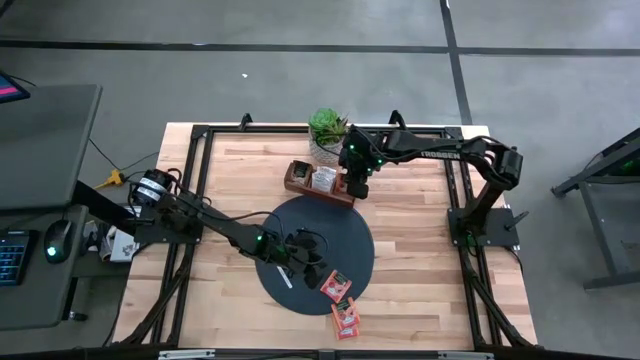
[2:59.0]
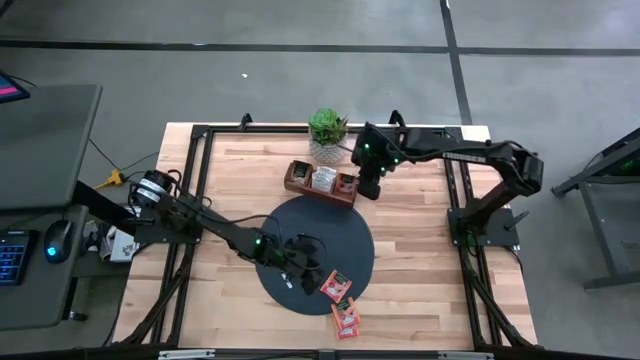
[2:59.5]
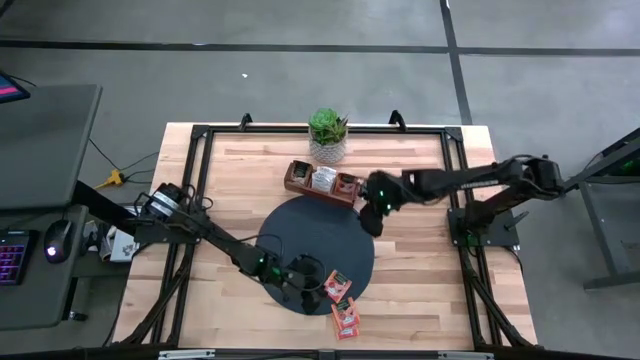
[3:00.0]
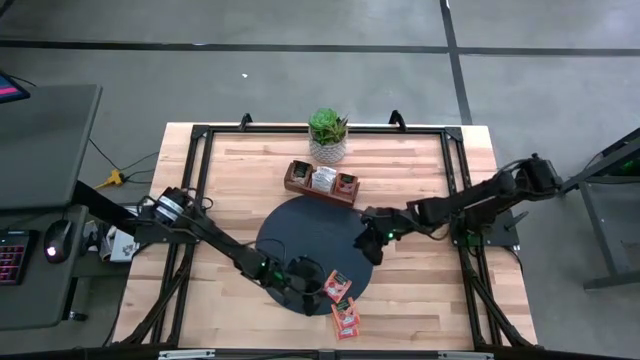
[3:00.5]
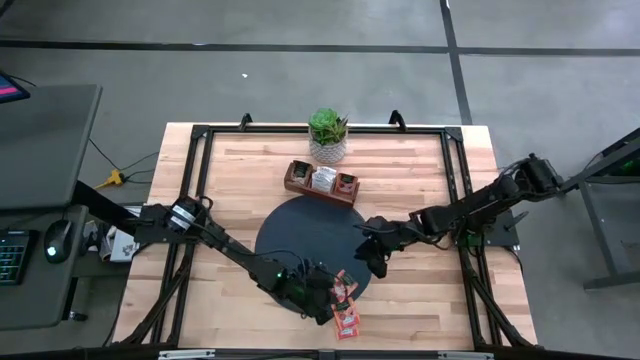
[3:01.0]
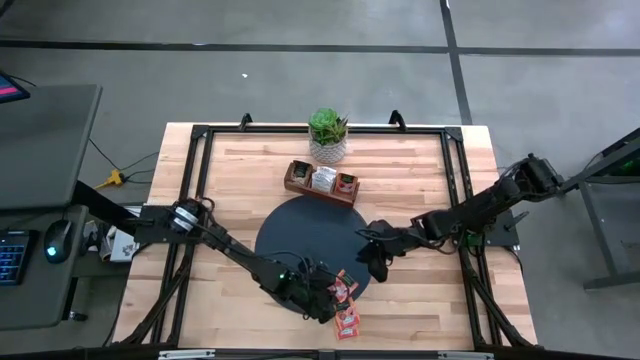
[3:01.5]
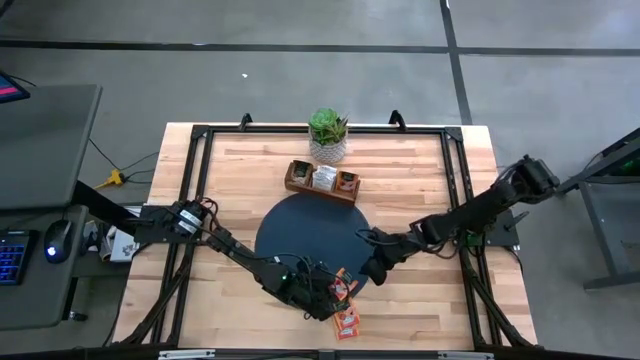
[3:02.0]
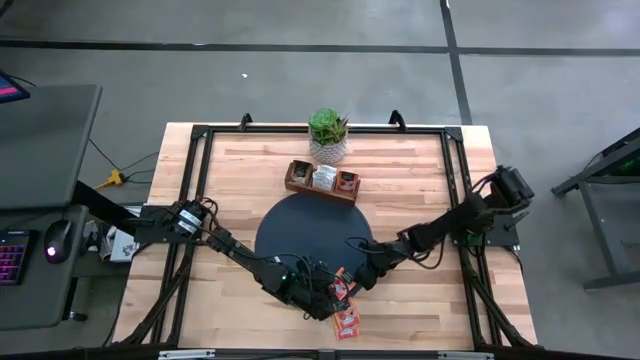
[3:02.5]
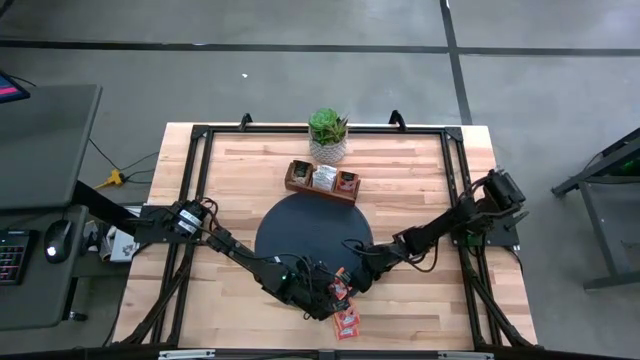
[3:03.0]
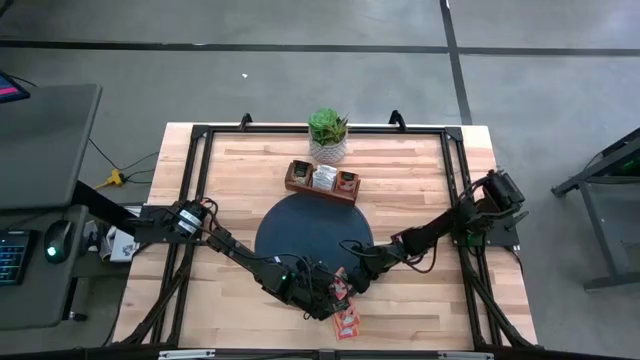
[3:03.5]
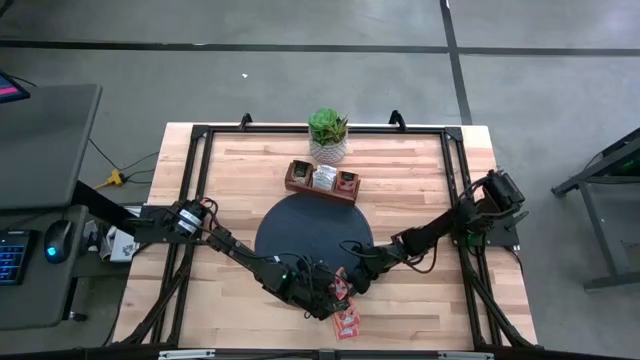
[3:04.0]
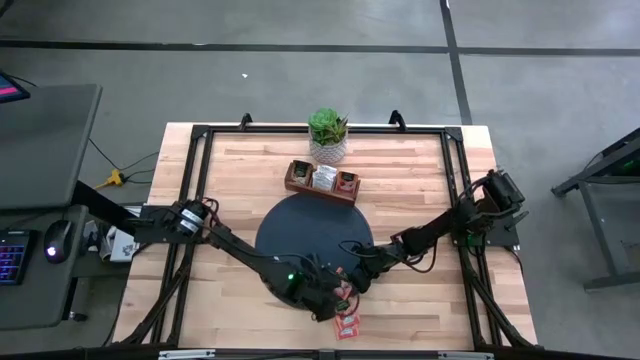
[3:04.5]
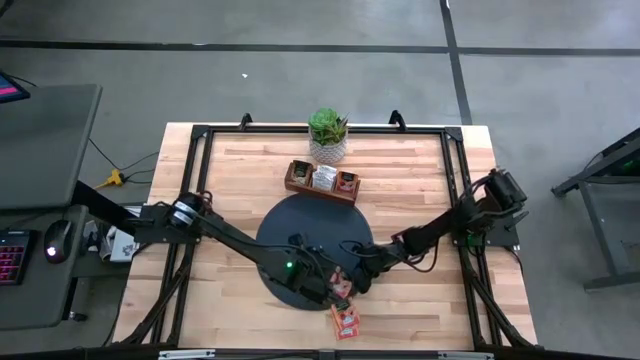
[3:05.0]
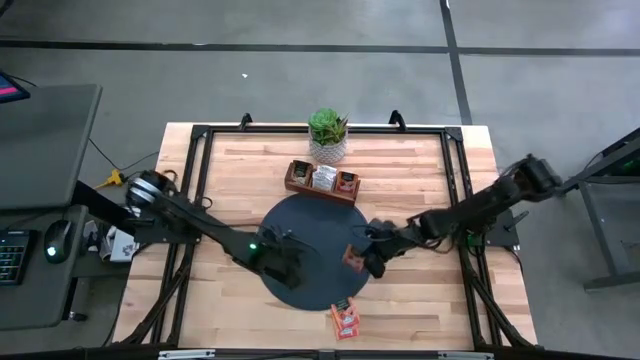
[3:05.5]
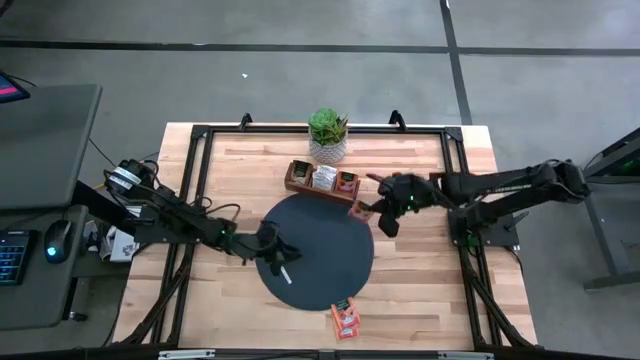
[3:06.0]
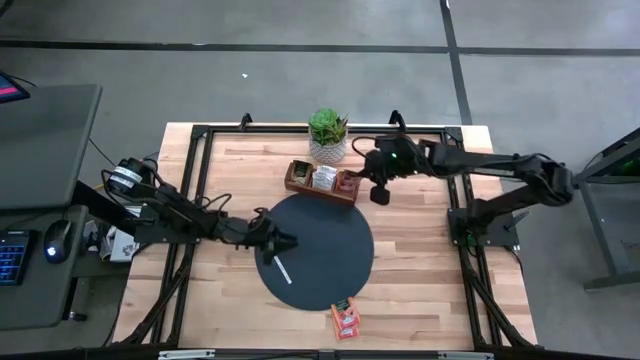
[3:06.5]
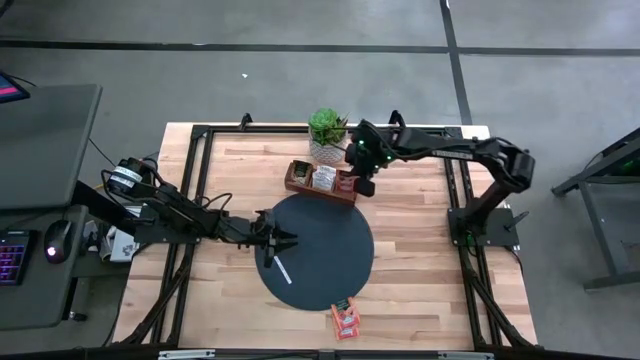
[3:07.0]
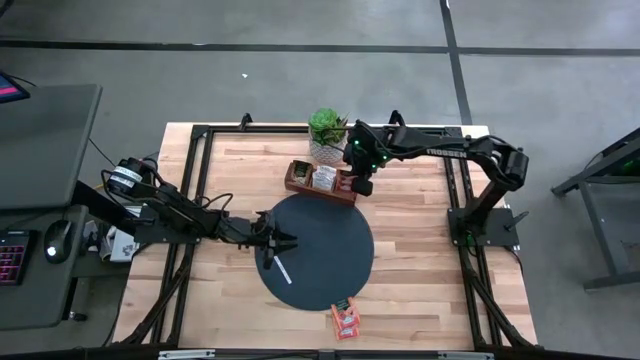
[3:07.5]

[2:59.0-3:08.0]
Task: Pick & Place Tea
Put the orange tea bag into the right section of the wooden organizer

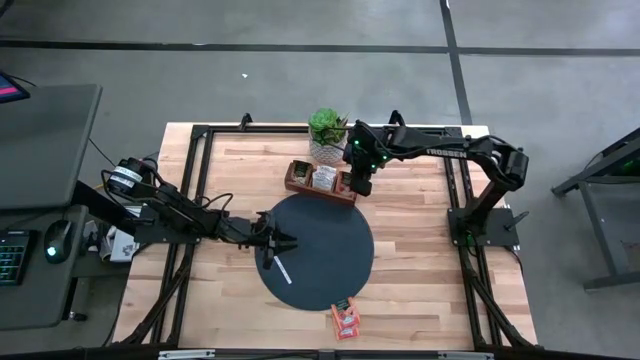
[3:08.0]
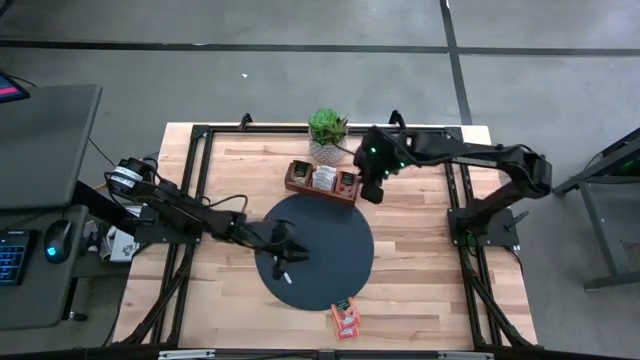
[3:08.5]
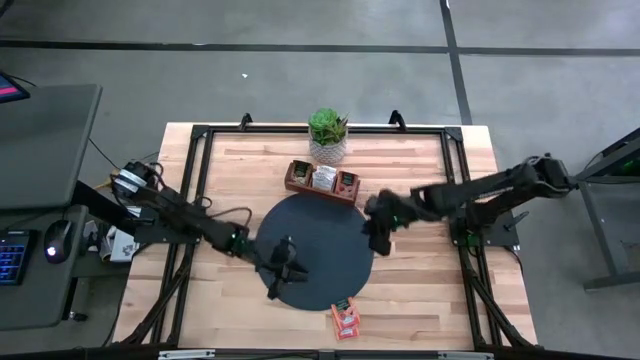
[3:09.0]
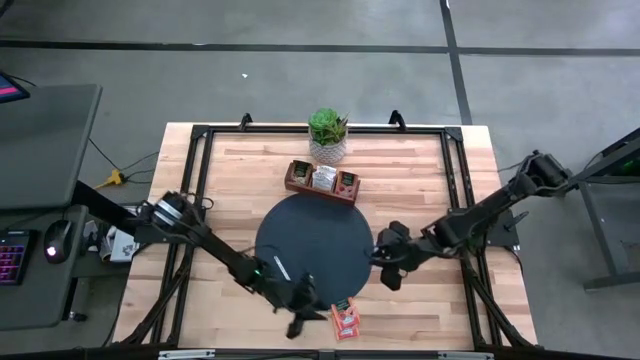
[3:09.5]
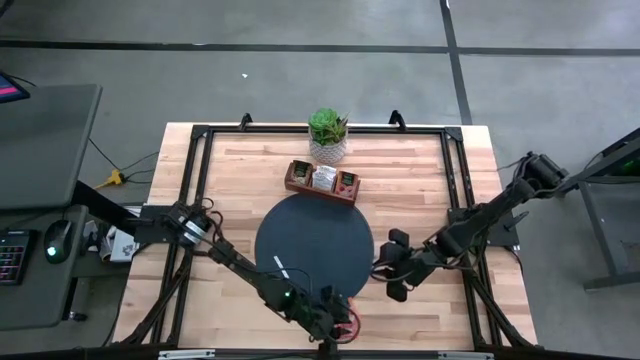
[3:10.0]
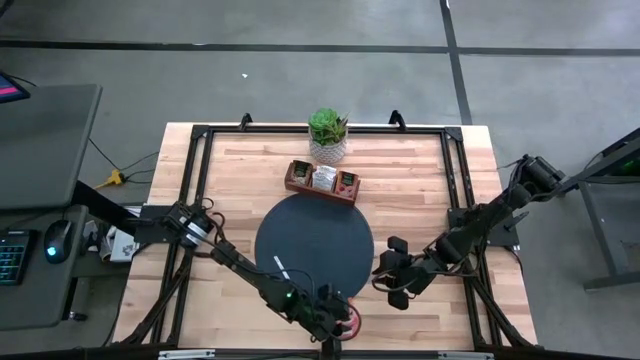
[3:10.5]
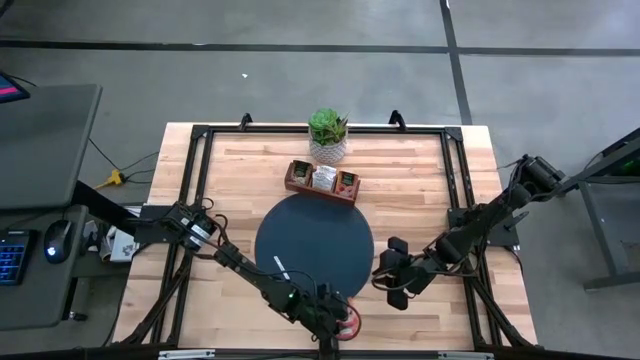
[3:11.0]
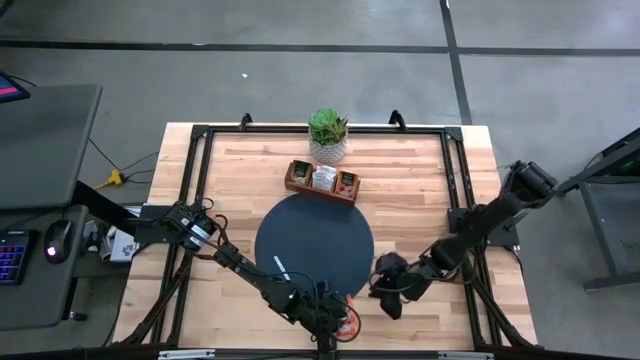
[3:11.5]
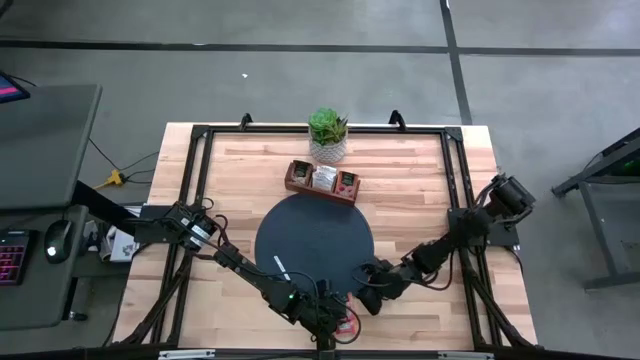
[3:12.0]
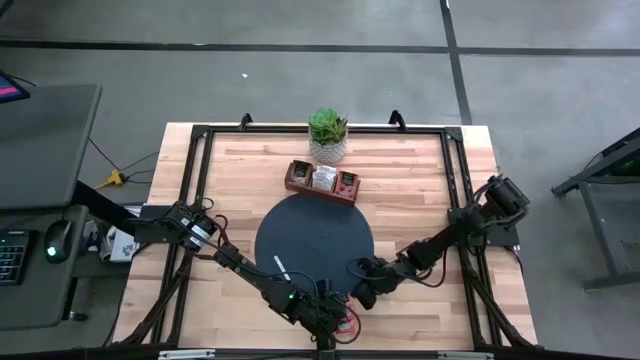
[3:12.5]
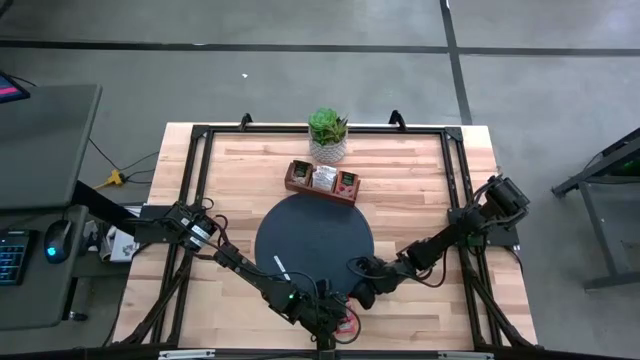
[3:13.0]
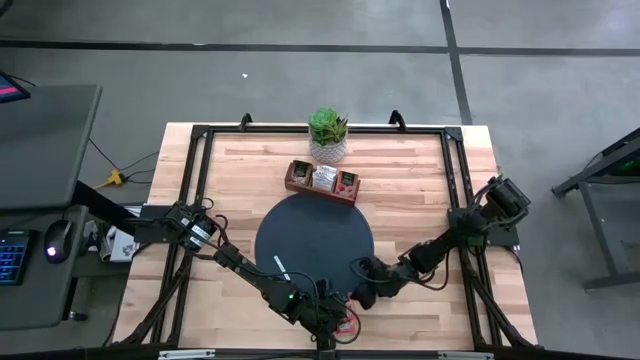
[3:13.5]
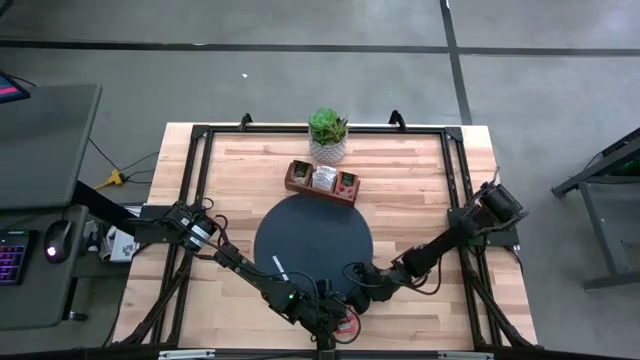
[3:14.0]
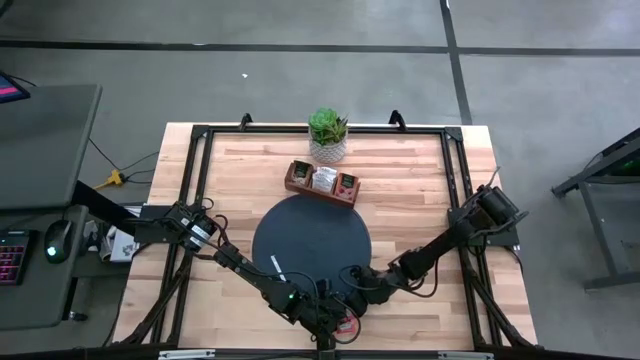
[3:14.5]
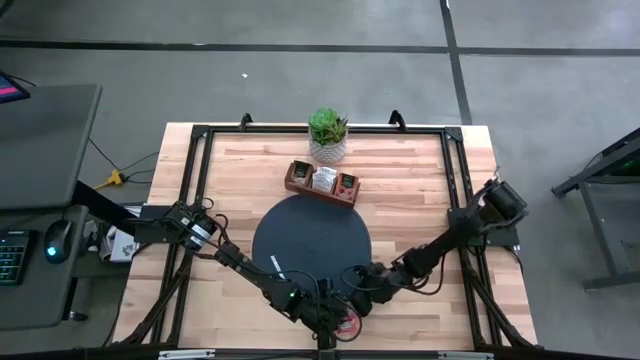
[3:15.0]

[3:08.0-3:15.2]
Put the orange tea bag into the right section of the wooden organizer

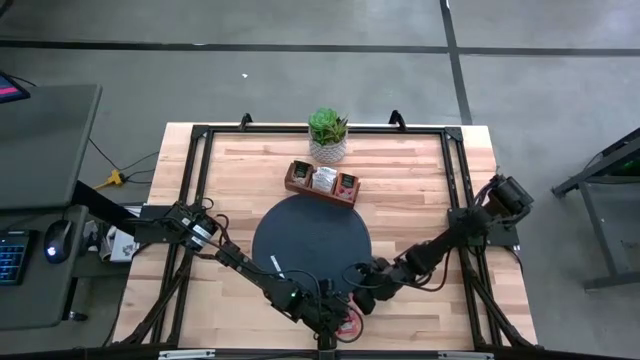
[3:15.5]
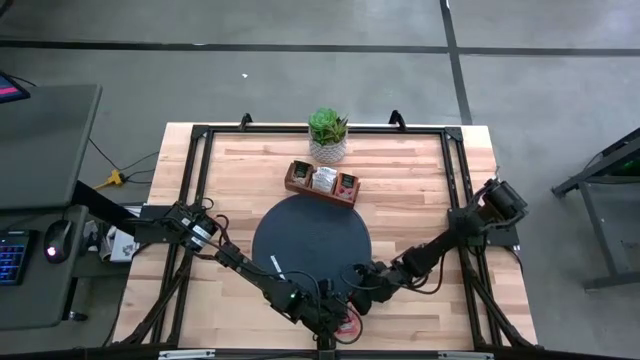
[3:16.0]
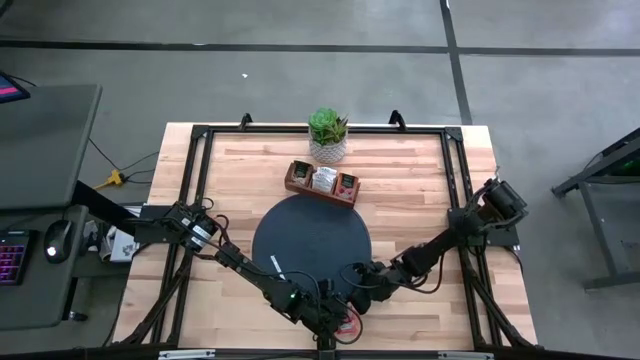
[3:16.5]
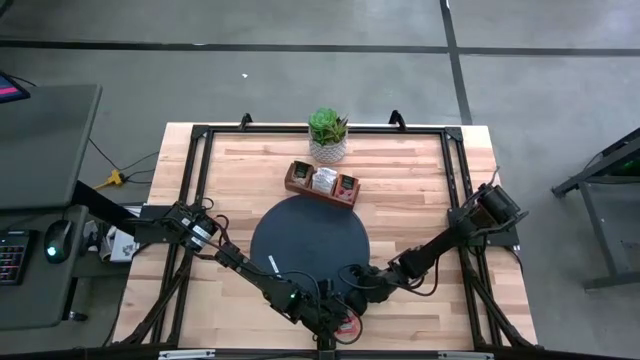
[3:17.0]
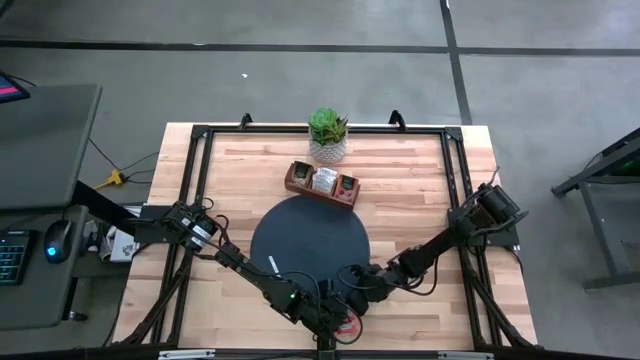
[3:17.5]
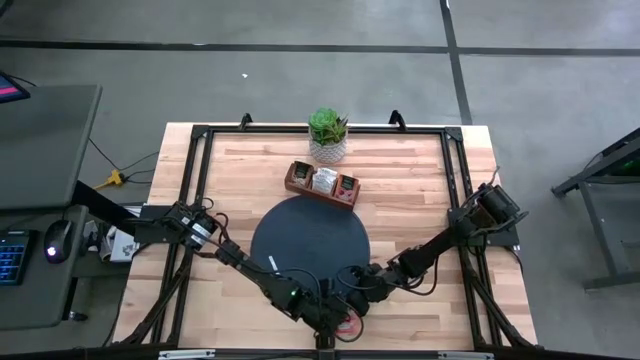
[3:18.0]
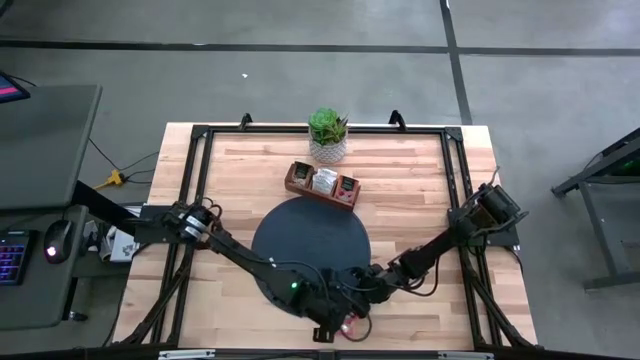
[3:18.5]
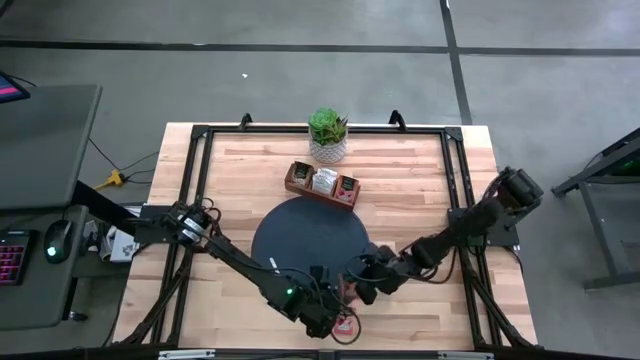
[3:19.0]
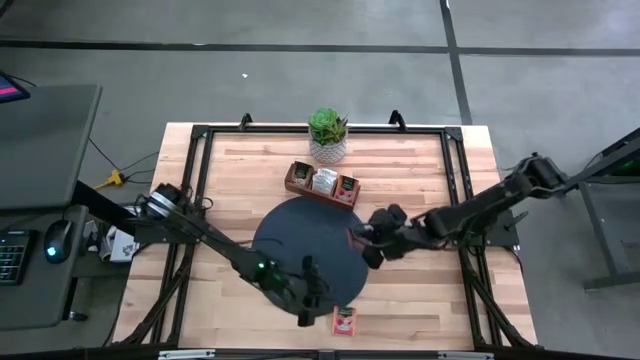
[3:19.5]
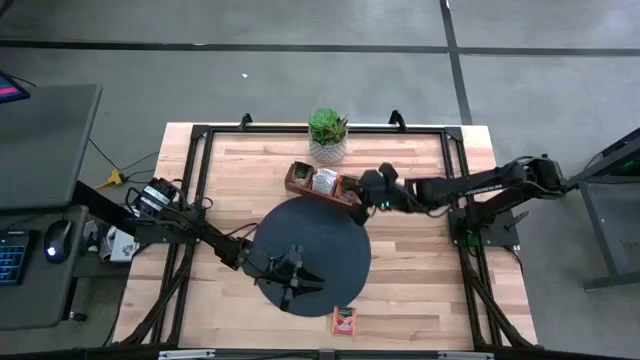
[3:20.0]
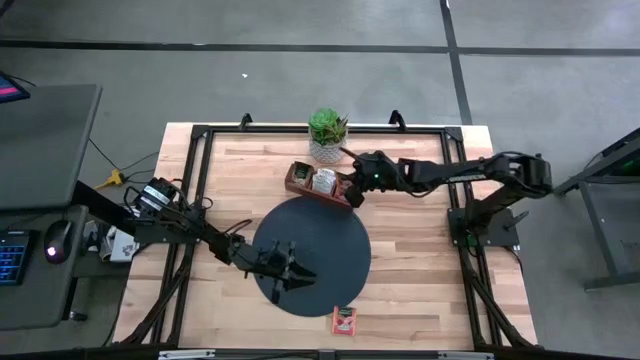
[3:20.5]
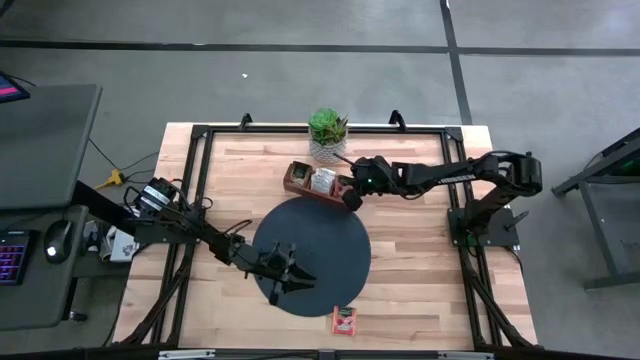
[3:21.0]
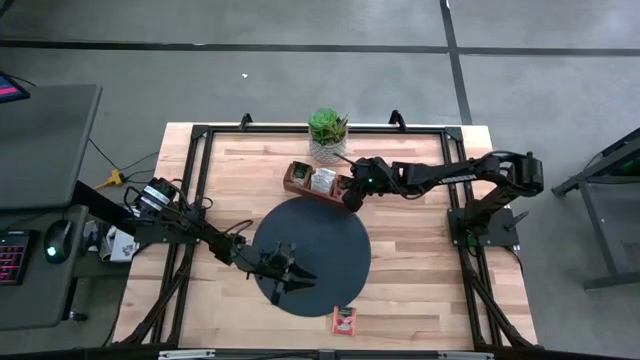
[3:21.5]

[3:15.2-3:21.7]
Put the orange tea bag into the right section of the wooden organizer
